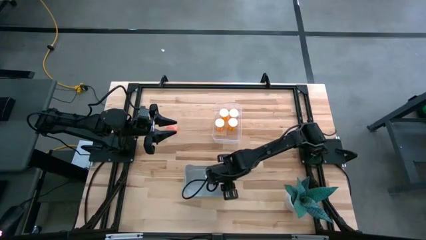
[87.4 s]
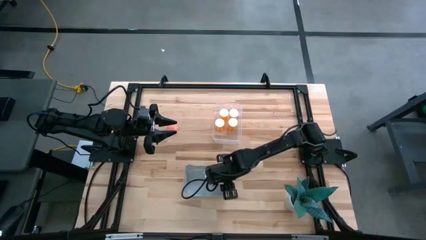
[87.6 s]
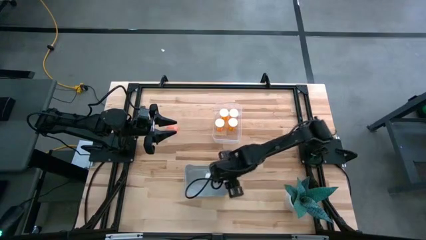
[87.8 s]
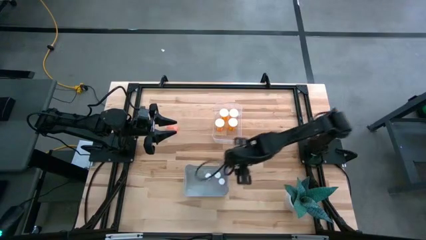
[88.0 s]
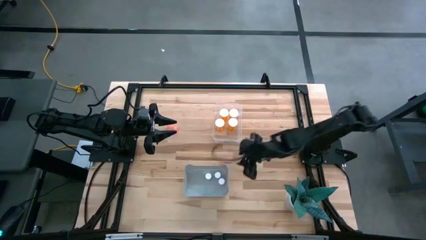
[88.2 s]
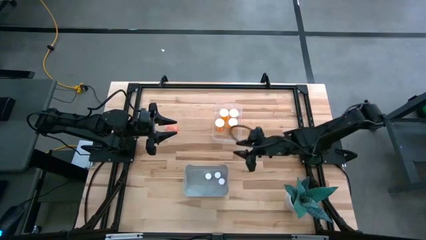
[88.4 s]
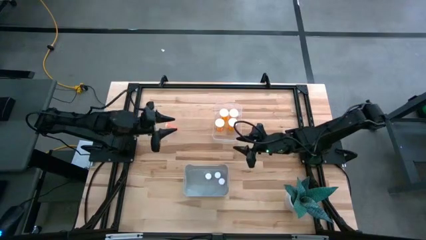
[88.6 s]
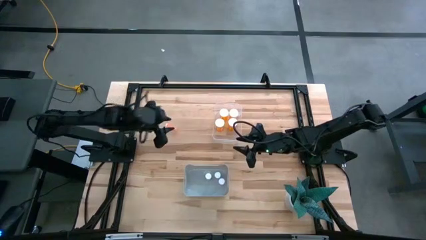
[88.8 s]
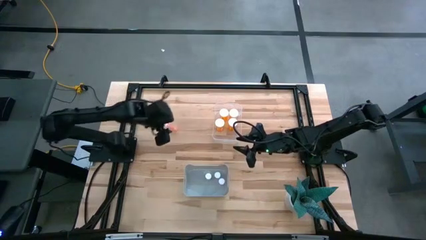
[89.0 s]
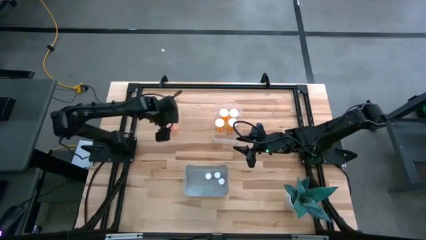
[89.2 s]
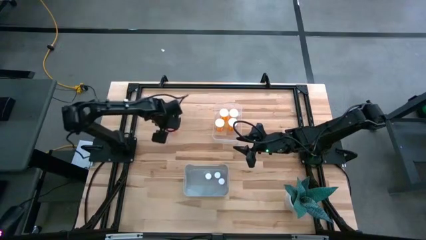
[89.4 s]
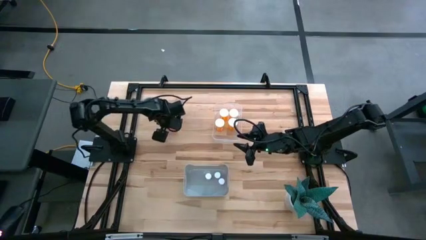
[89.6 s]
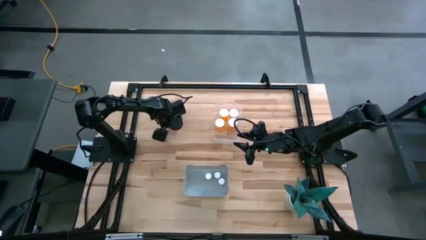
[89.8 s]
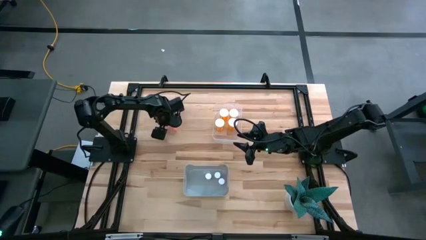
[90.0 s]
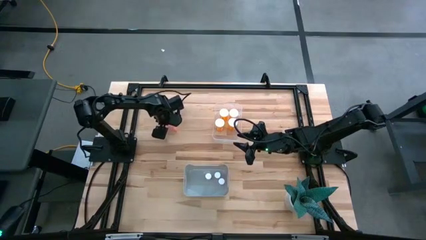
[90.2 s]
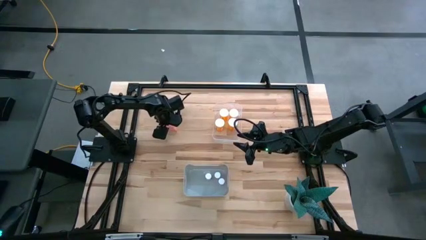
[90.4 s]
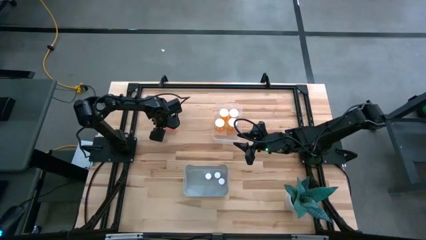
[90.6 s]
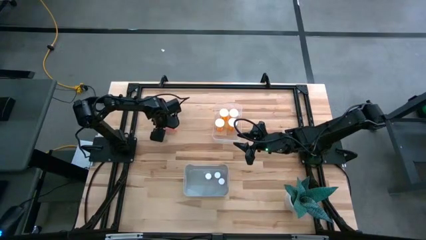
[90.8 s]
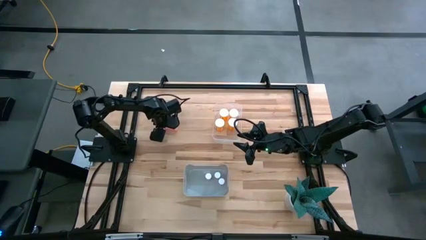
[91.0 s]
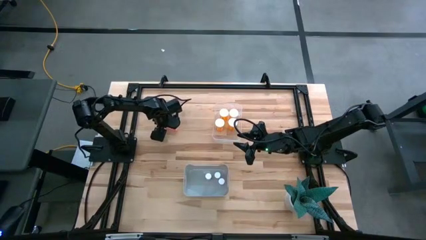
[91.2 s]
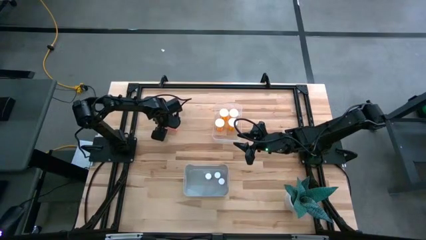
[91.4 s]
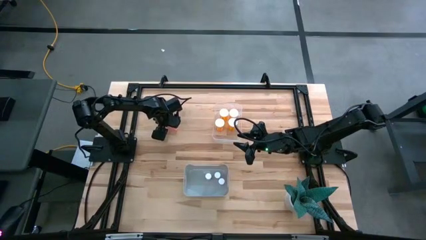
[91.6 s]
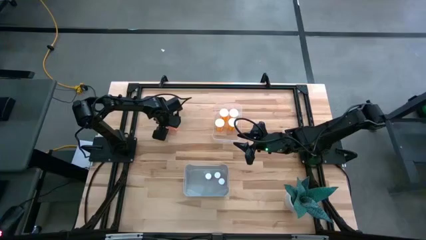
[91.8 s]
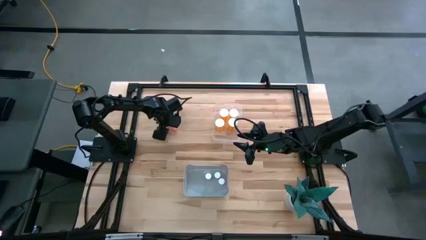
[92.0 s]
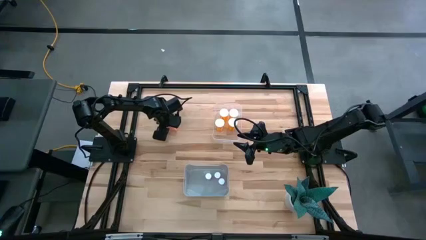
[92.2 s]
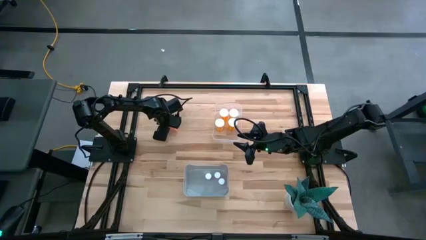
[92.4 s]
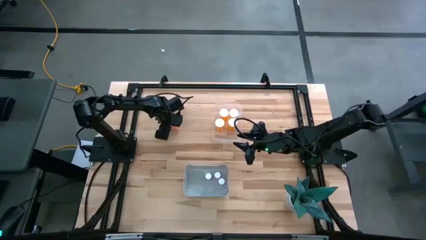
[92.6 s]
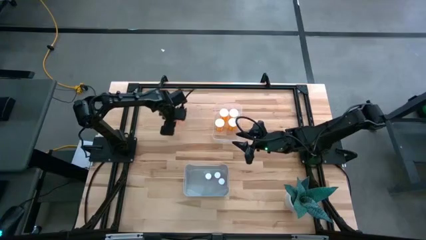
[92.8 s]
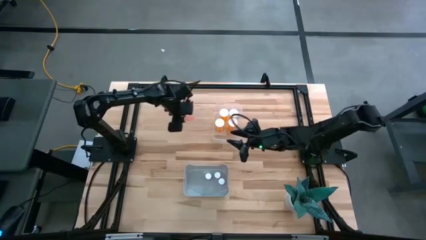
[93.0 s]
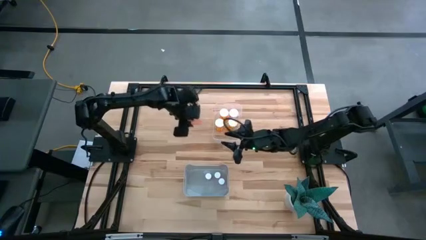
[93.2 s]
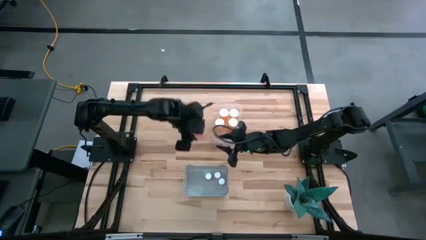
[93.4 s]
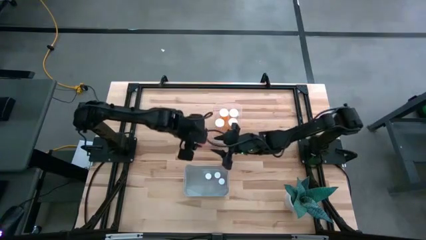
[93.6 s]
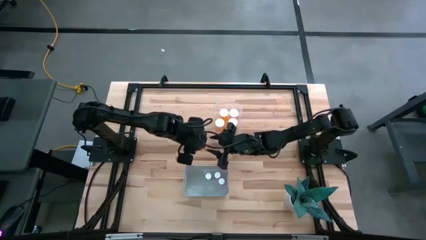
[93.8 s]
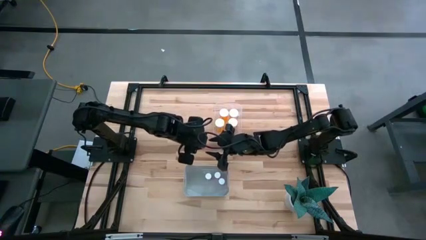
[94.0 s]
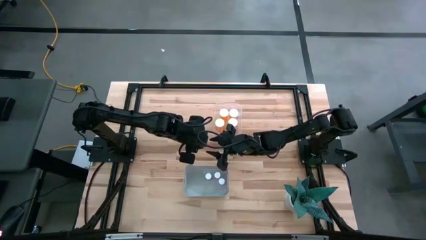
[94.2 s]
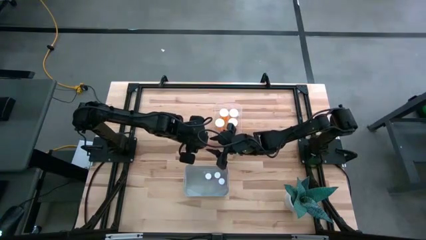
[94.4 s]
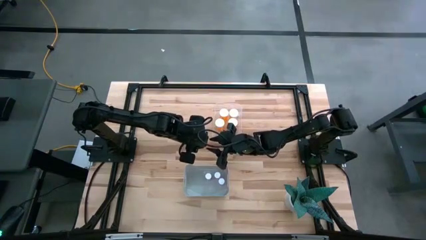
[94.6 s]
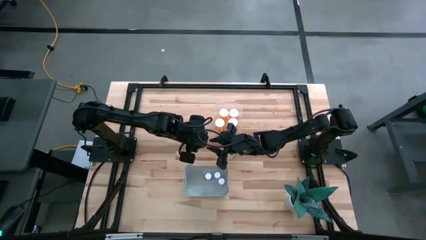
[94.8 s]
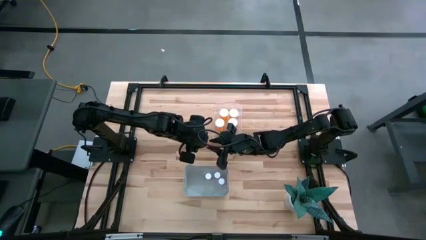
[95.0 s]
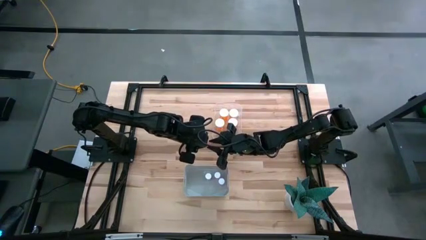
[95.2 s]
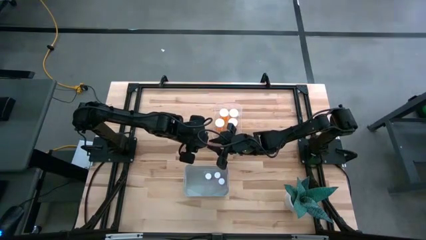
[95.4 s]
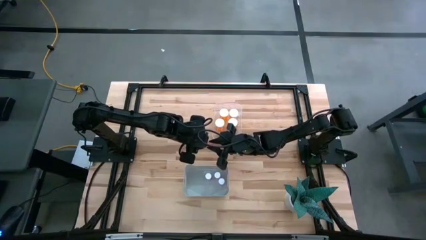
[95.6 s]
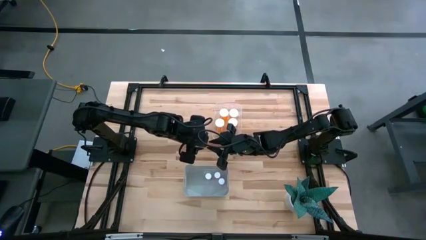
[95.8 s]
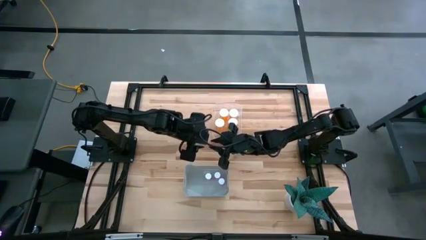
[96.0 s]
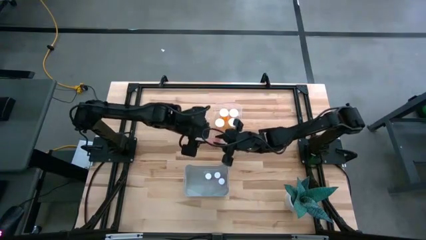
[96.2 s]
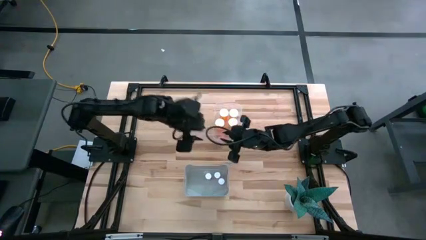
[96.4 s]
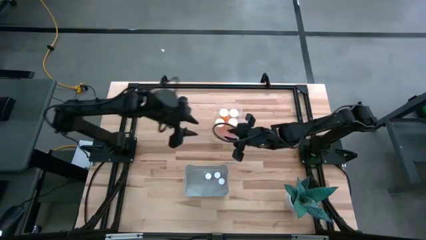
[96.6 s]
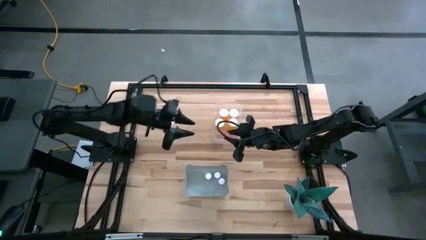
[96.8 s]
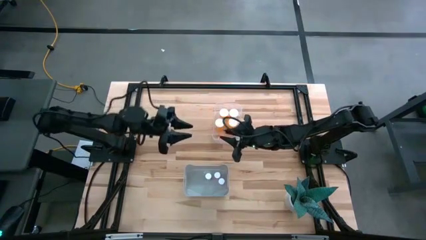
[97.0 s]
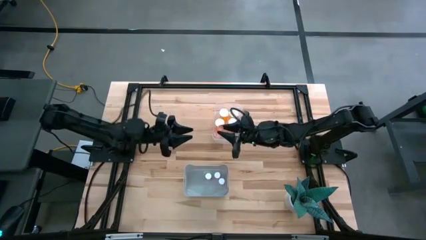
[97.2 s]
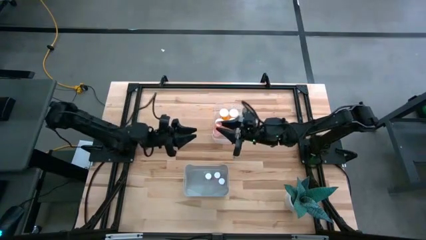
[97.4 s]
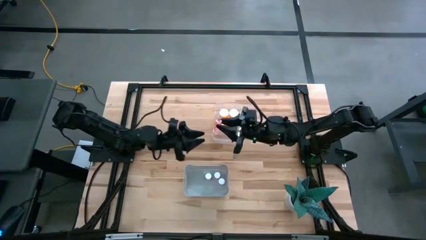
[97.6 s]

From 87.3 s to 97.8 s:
Task: Pick and place medicine bottles into bin by pill shape (circle, oval)
Put the pink pill bottle into the gray bin

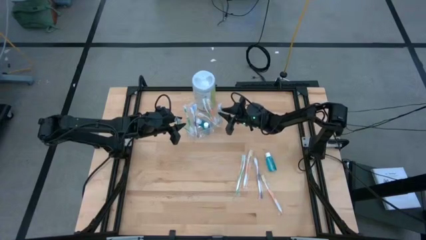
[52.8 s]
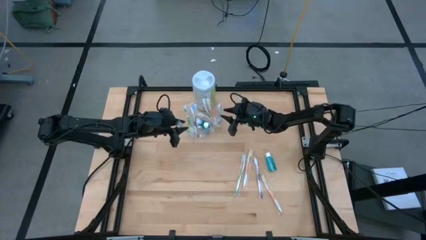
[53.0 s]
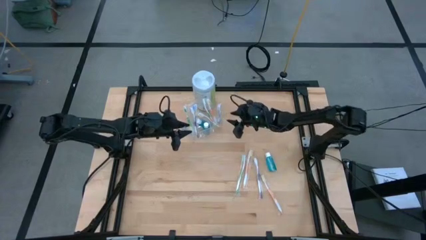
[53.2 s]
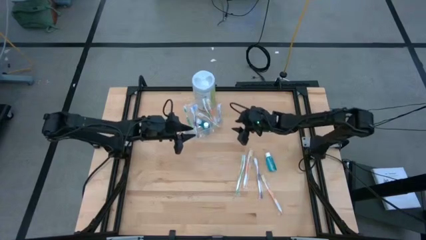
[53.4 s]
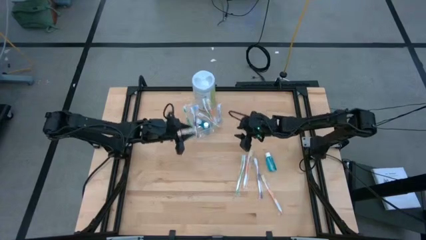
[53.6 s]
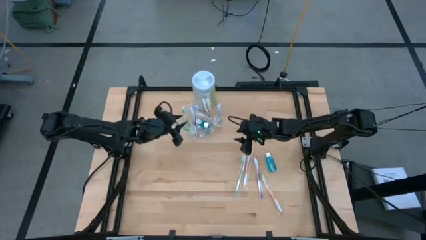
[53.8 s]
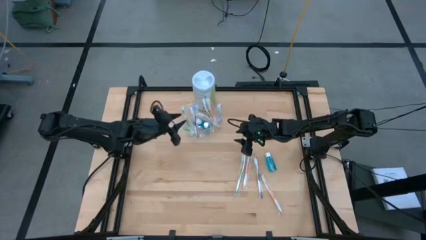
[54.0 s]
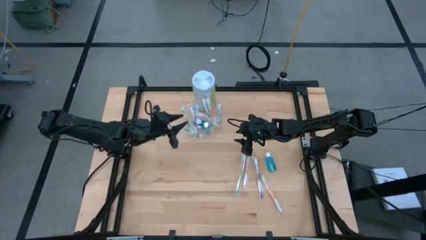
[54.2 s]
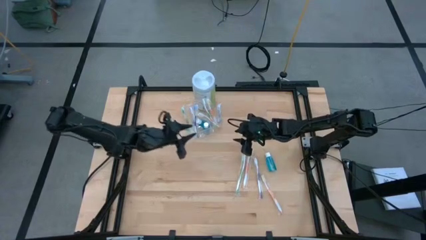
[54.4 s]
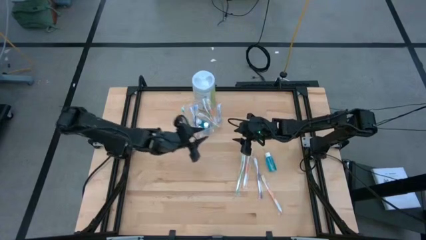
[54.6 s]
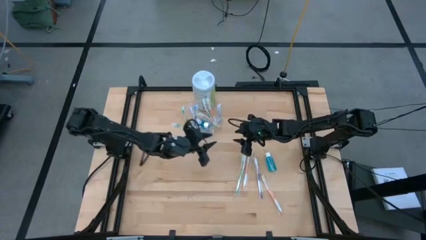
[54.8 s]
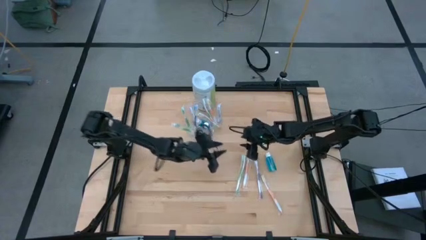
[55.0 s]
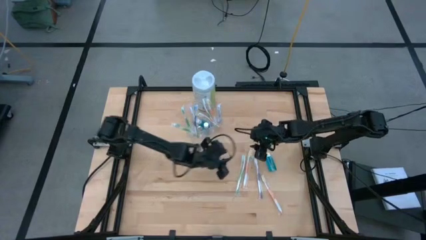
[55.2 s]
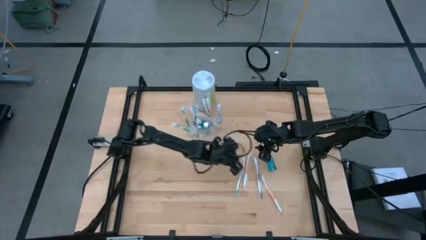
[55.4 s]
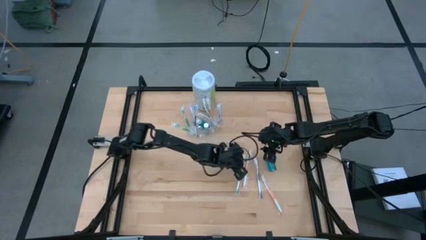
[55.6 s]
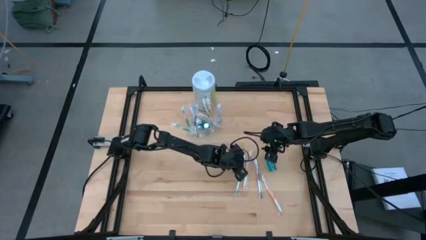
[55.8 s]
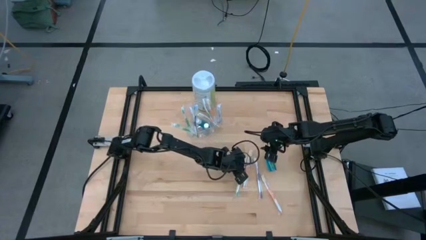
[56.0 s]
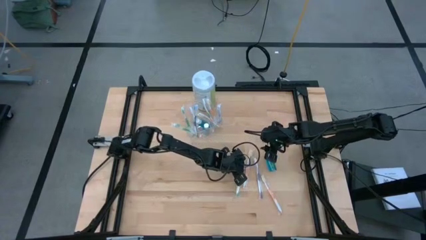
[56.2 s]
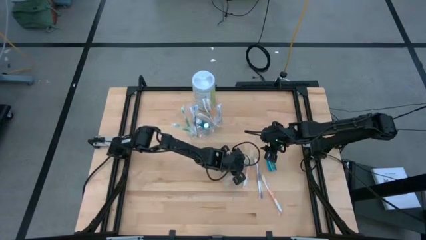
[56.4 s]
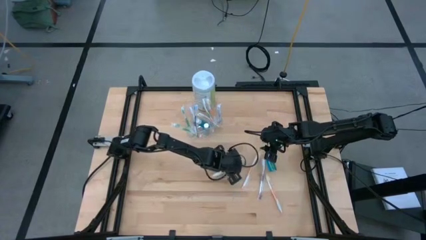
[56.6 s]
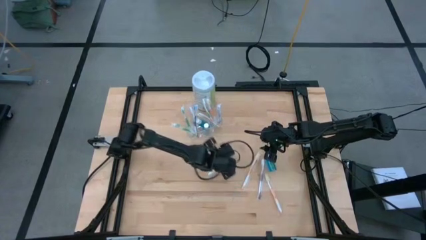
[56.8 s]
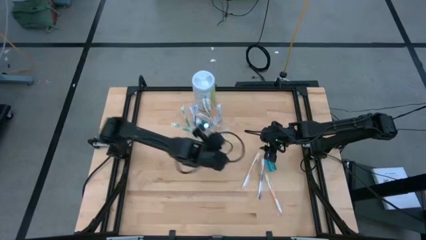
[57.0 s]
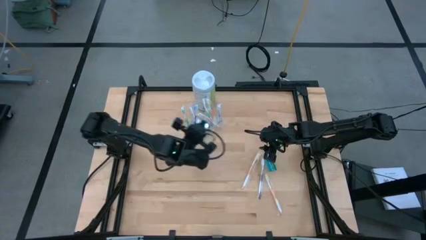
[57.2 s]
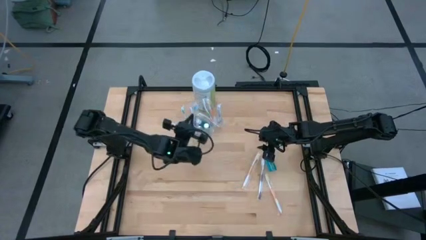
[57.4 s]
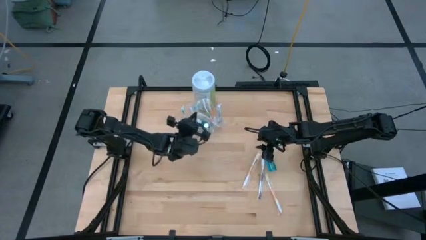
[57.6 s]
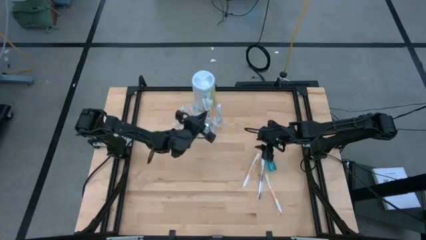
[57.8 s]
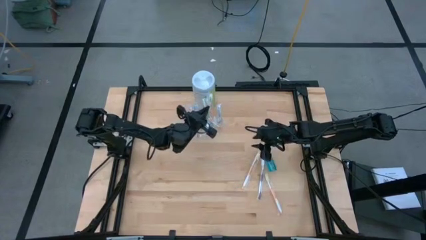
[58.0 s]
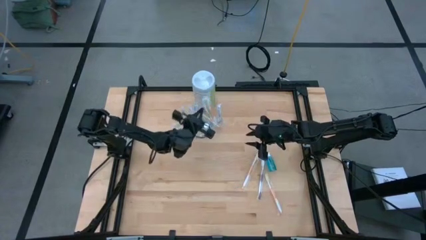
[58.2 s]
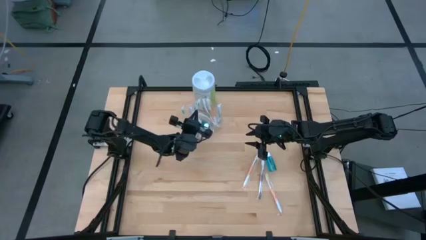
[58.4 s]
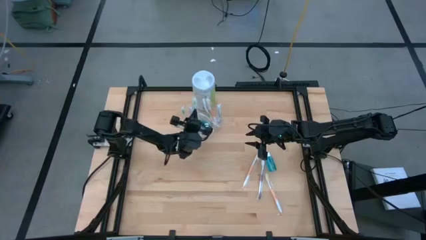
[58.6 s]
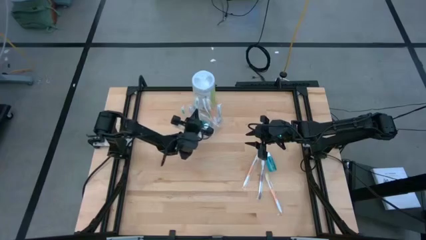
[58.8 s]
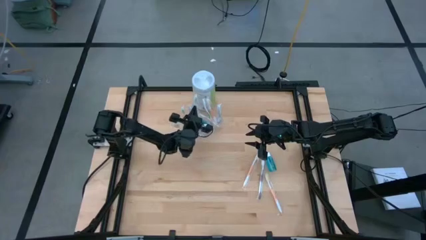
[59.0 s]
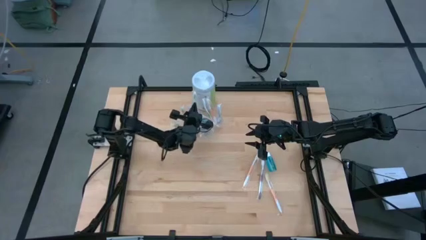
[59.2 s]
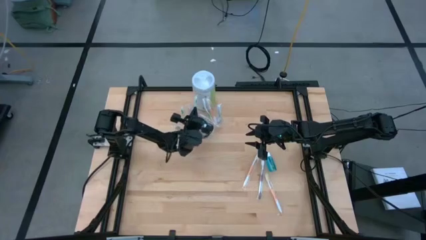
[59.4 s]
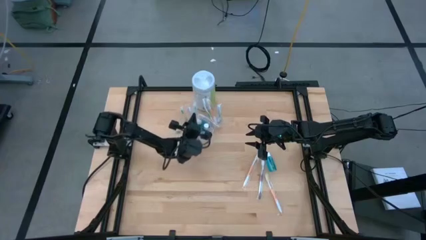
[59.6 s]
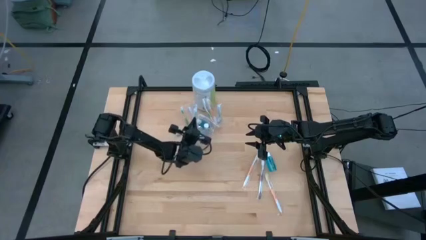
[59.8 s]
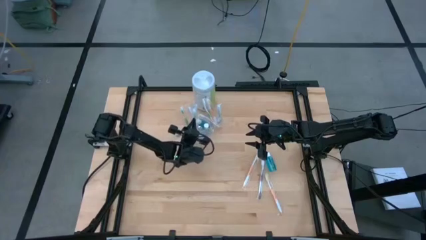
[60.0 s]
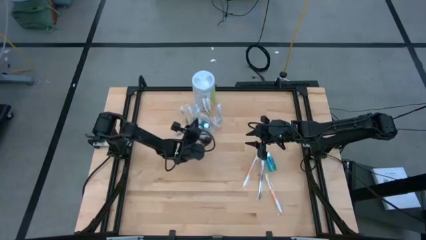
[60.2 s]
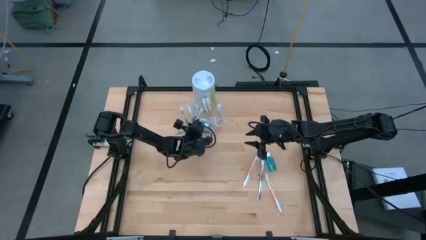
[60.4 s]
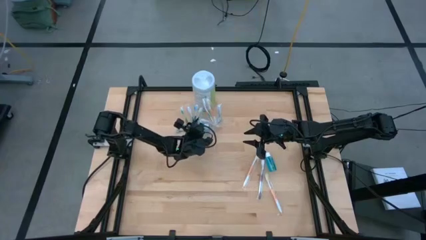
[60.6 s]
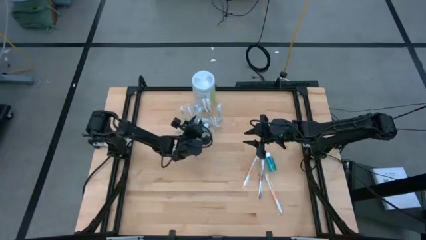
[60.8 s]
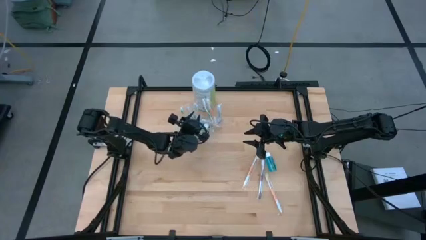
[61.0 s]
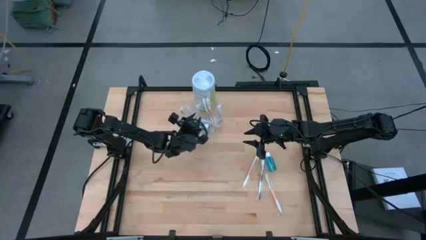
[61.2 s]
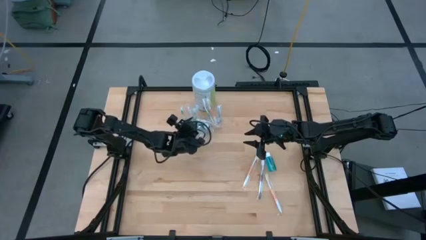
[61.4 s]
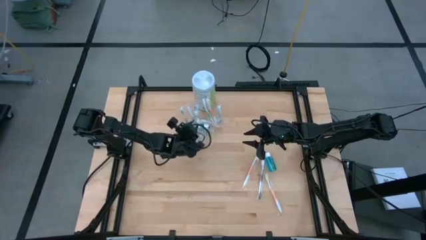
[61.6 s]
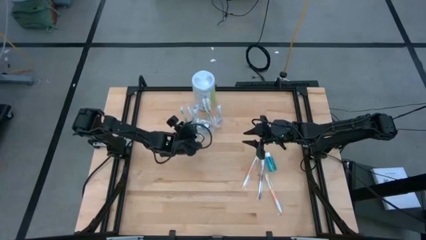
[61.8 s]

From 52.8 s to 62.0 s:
Task: Pick & Place toothbrushing station
Put the green toothbrush into the transparent organizer
